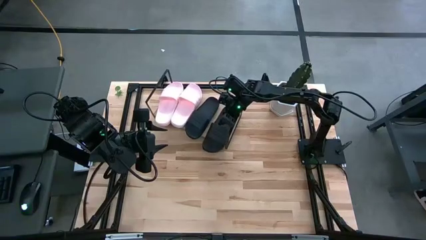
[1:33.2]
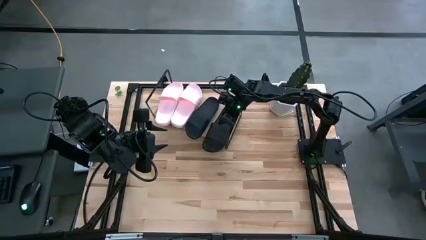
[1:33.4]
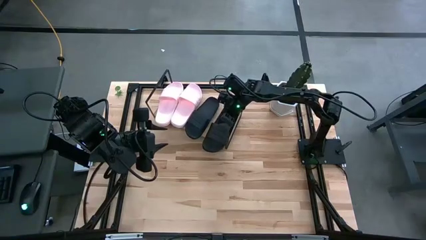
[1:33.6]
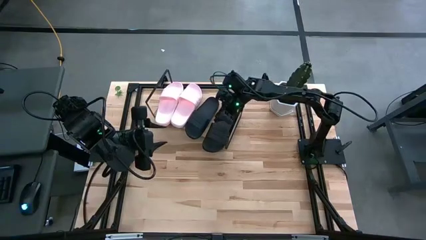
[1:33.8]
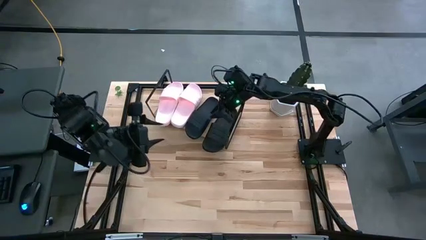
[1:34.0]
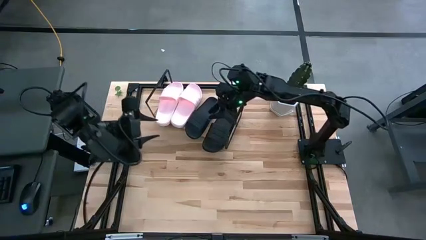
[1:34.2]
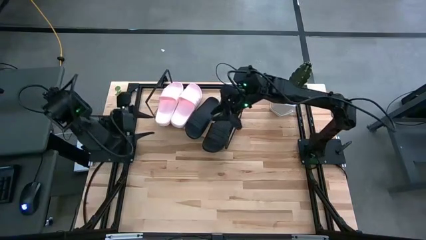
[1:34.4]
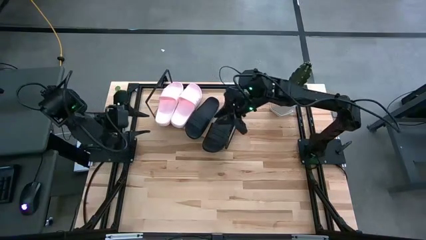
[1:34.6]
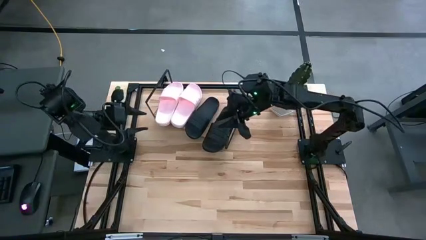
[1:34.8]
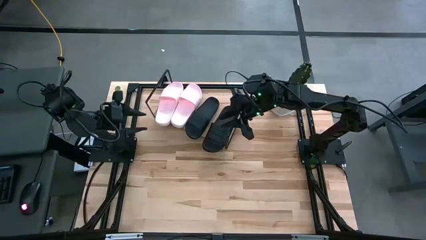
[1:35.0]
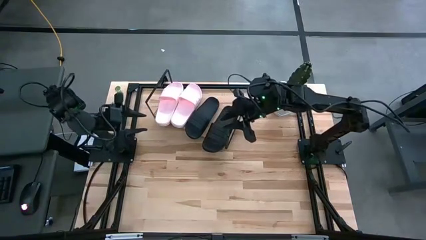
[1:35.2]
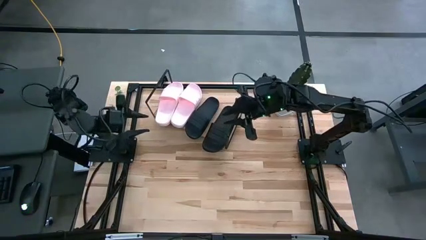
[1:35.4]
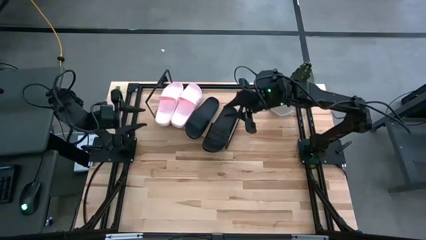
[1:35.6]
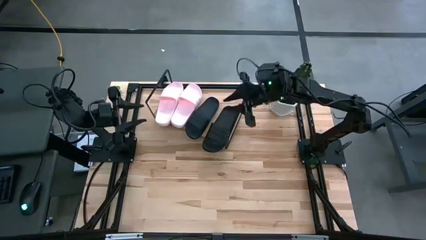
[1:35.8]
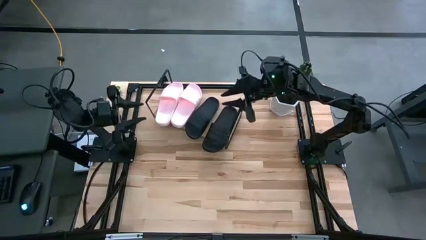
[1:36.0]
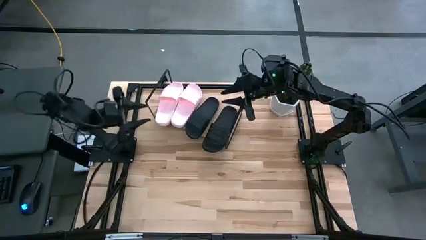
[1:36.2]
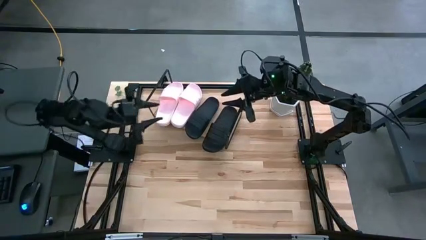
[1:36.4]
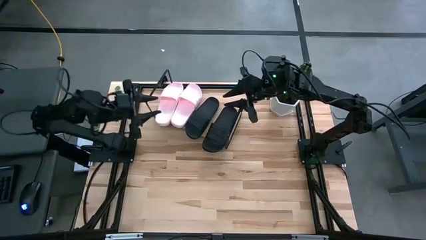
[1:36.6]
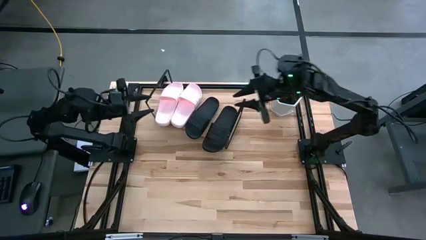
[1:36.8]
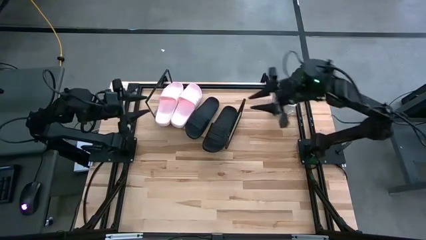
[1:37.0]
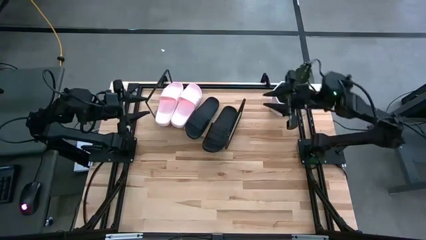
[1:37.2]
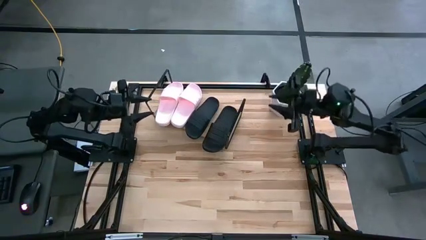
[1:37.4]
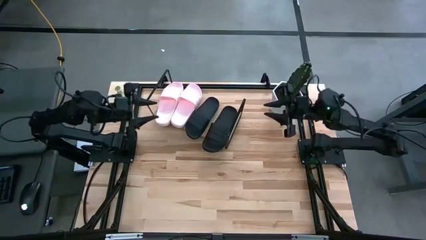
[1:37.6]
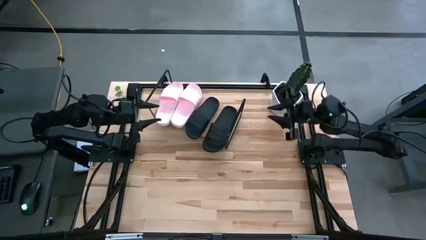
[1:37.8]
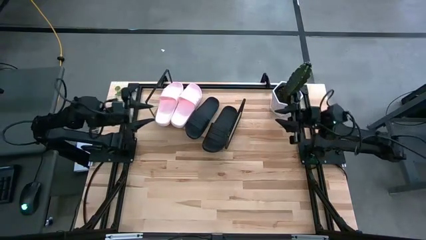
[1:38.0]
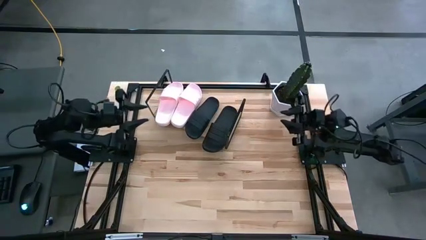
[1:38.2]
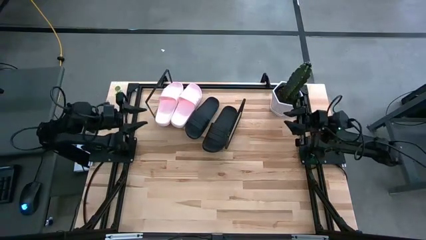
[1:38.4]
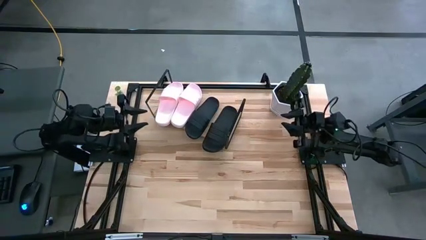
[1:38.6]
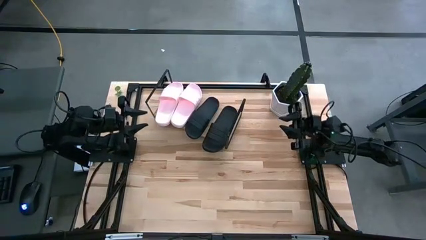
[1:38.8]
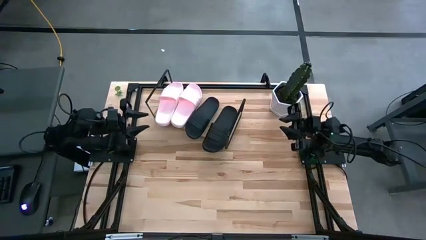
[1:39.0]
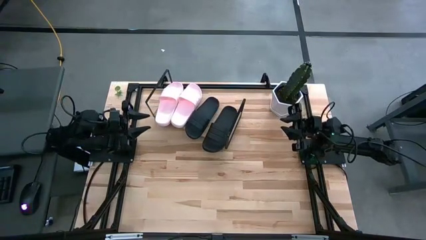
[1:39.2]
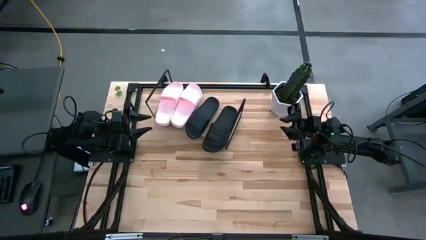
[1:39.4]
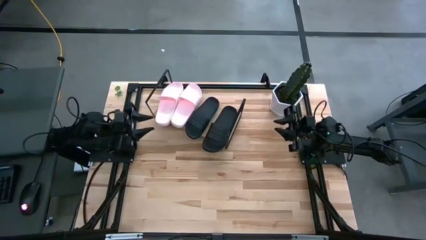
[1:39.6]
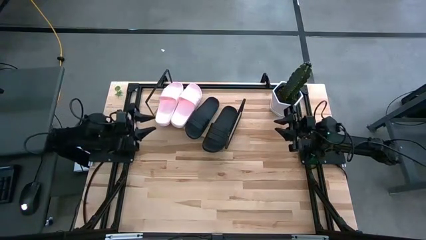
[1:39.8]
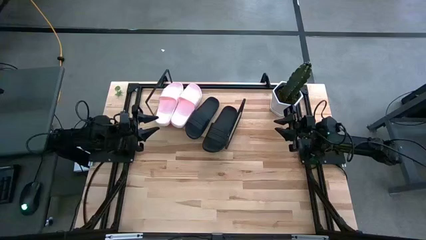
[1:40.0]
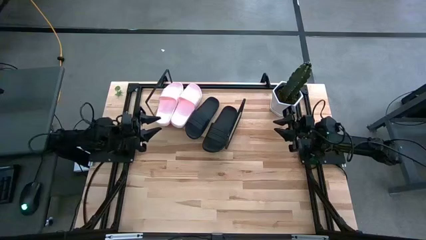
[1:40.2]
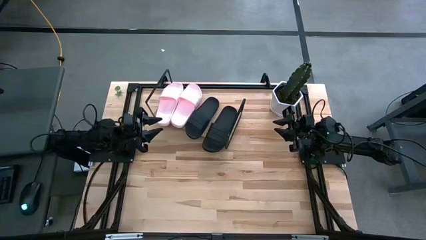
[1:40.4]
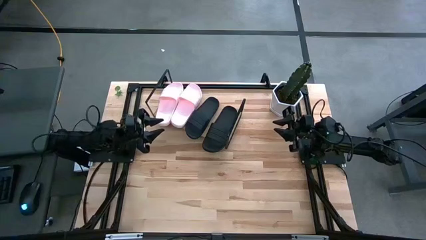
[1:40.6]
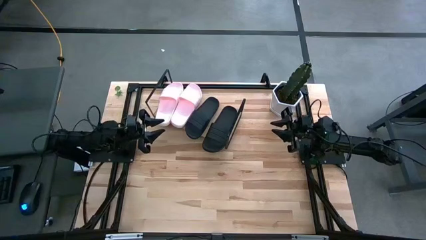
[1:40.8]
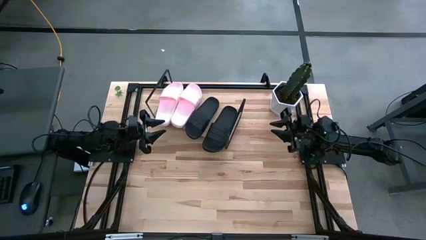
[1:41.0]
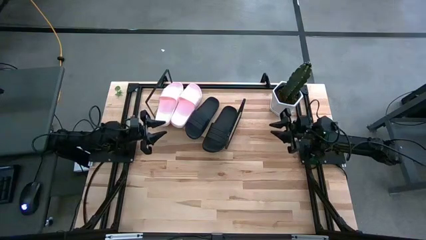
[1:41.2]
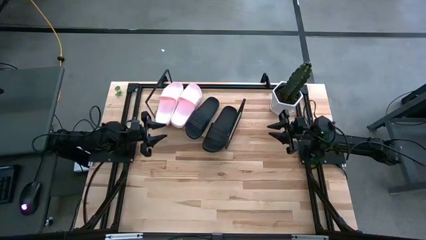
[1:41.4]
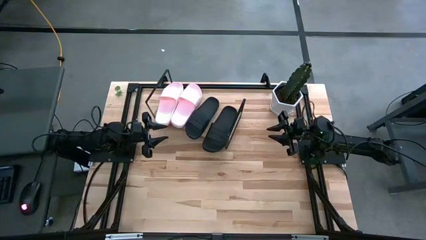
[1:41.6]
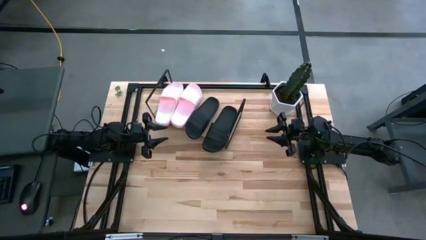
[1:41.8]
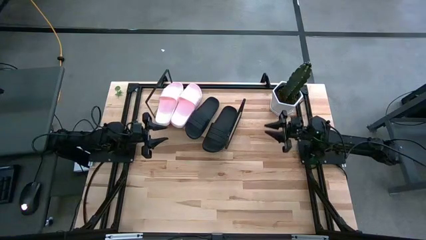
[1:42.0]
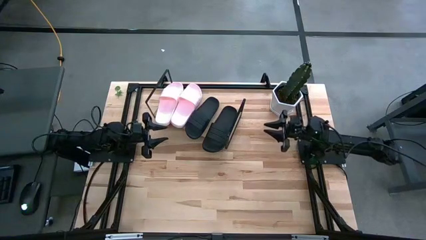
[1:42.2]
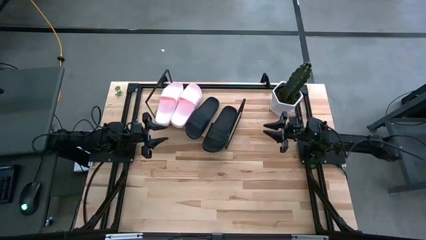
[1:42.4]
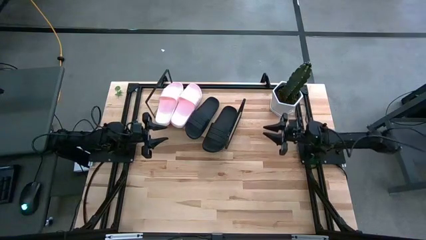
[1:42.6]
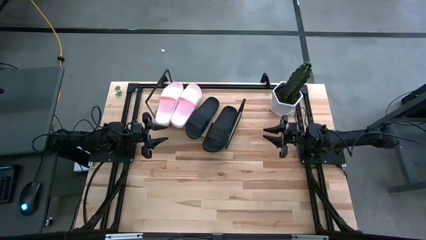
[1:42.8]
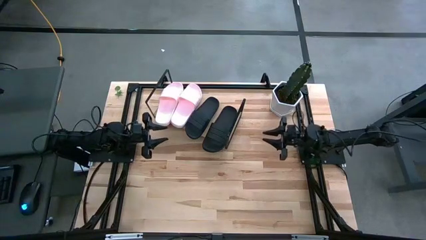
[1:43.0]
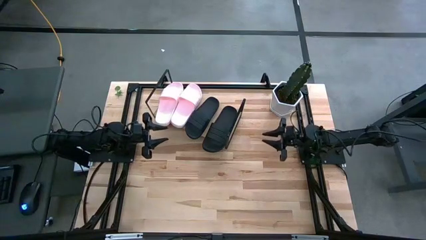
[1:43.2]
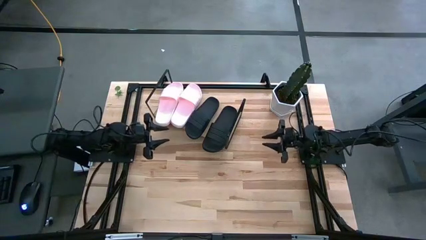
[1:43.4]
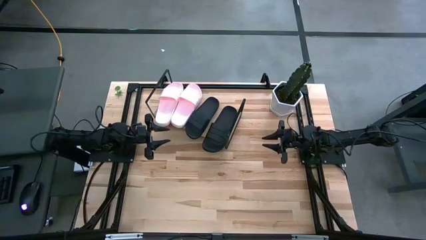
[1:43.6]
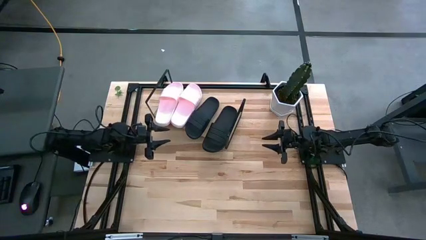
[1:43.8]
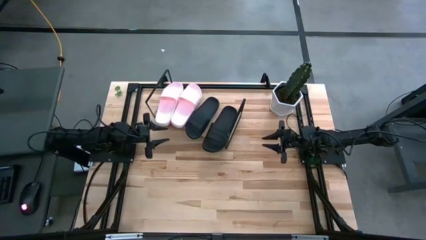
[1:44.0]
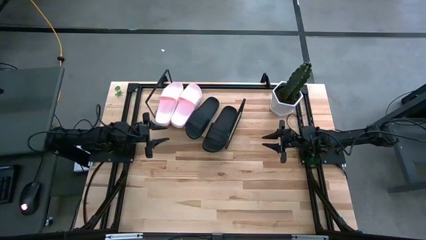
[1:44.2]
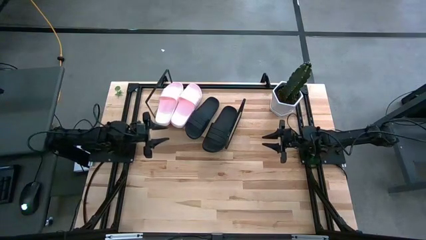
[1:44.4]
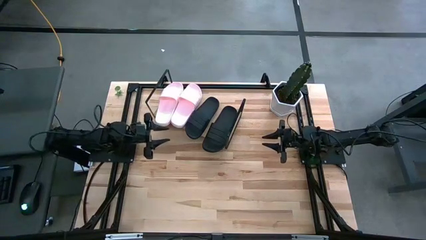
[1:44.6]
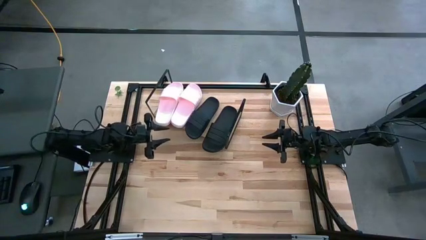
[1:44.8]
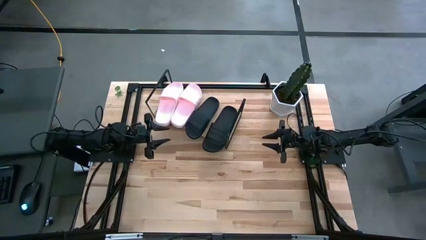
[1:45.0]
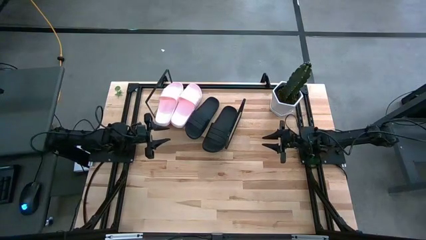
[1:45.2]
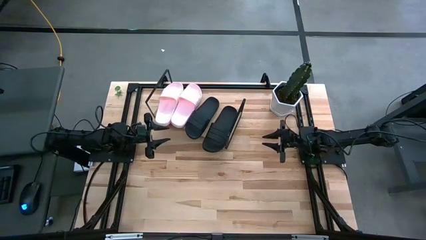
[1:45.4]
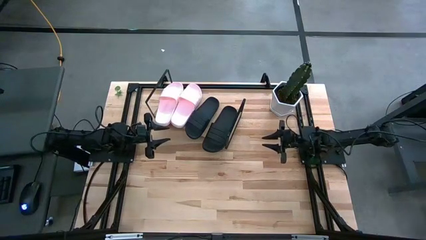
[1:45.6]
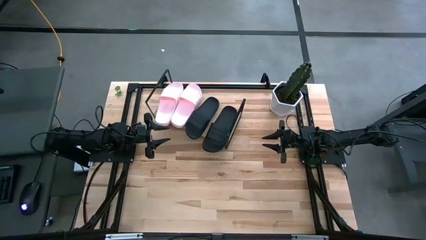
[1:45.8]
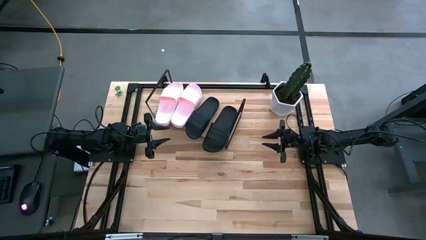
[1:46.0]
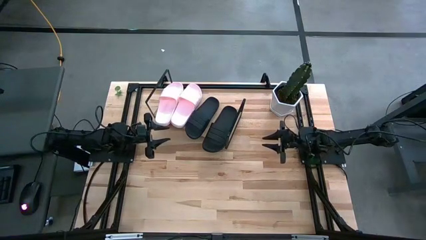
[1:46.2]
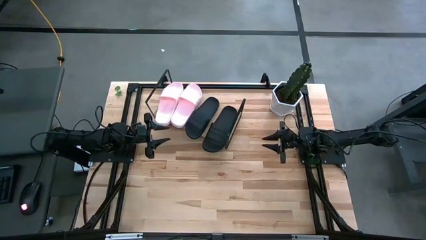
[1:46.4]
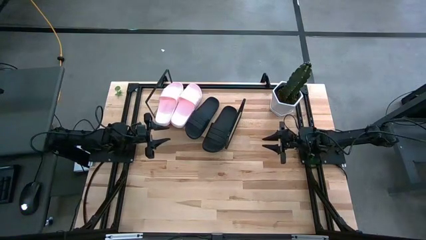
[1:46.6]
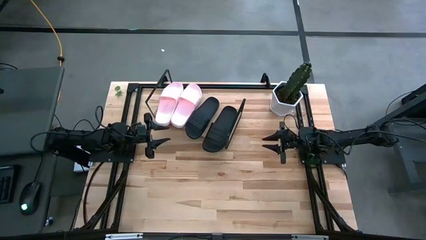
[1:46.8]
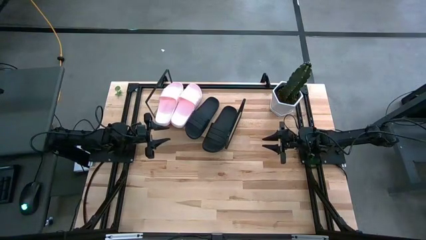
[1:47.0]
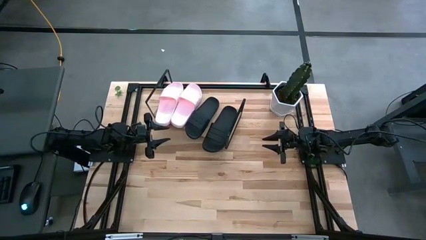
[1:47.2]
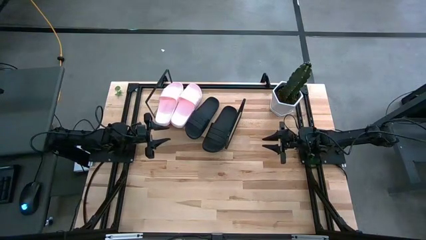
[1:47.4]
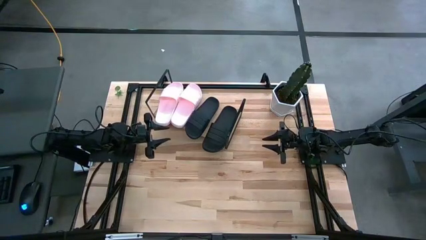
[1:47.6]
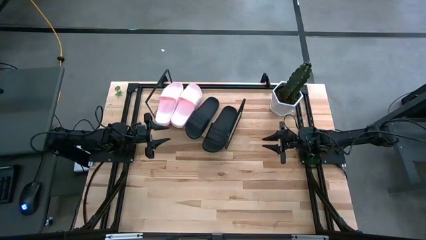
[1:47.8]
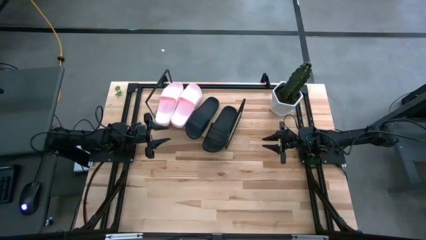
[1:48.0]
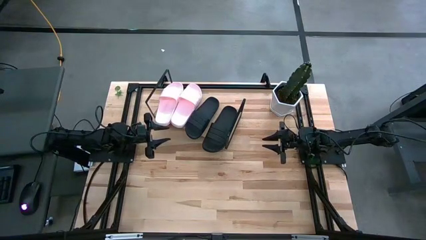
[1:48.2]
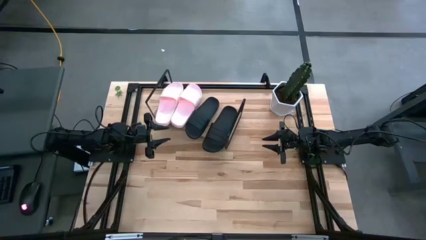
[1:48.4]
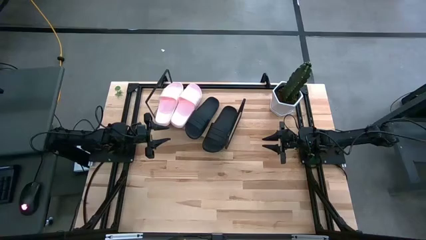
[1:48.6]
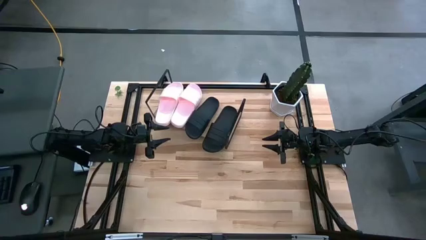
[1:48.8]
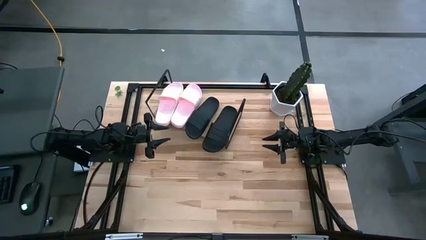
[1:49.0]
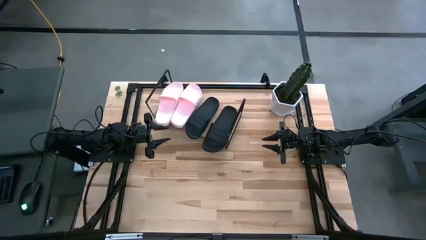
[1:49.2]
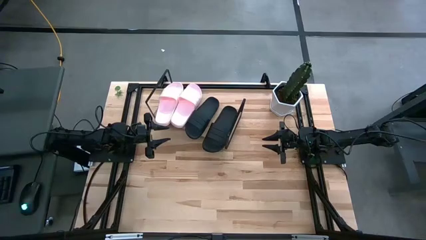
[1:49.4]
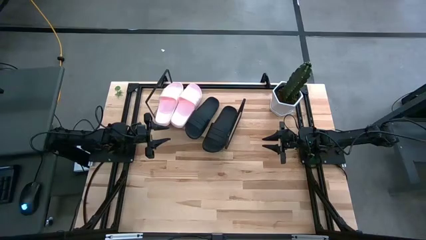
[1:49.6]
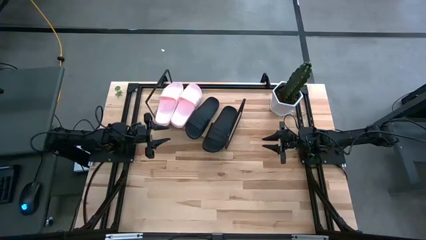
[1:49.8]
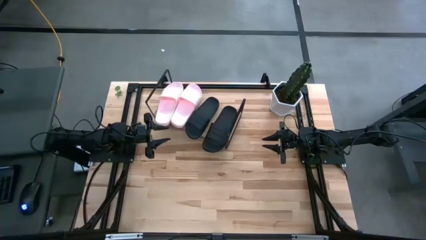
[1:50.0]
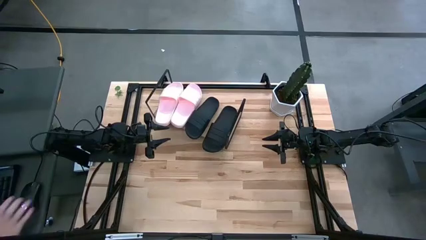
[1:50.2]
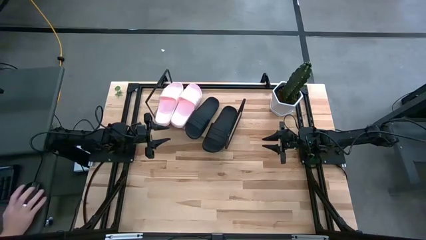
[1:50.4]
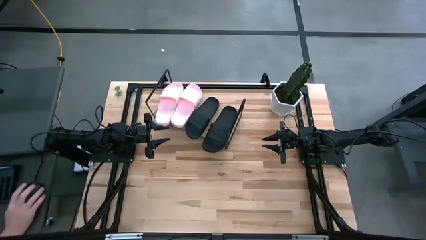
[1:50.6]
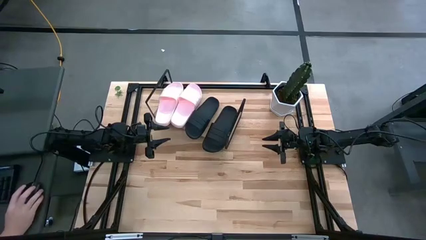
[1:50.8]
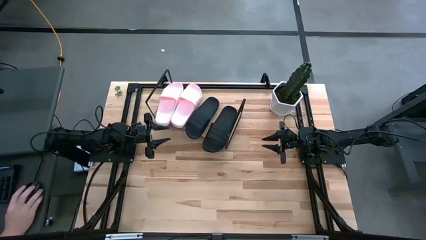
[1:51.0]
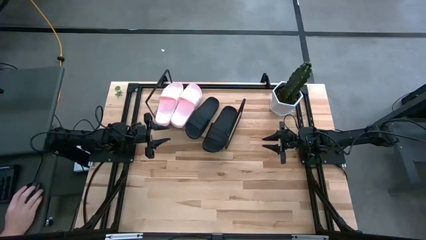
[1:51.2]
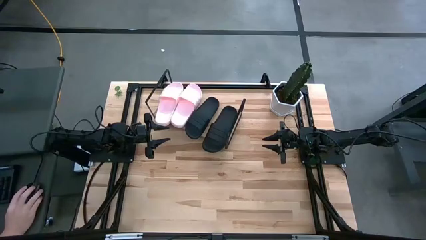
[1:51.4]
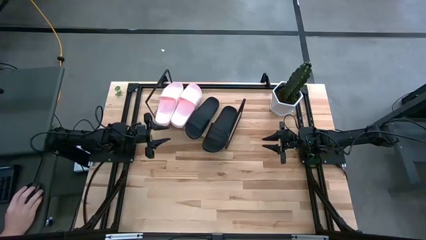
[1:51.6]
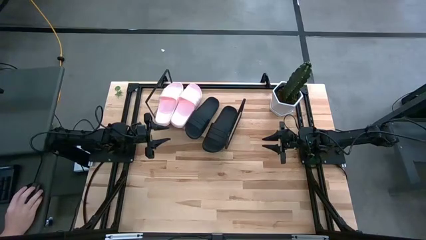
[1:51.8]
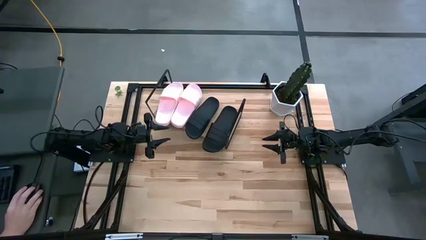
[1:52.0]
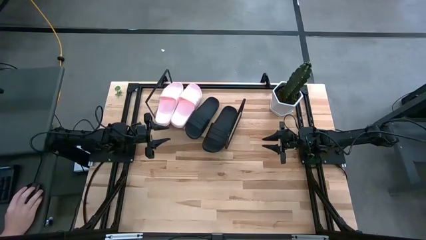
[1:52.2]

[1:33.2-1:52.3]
Task: Pick and place slides into the shelf
Return to Home Position
